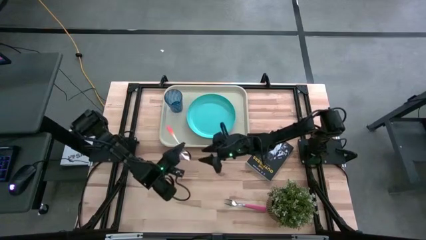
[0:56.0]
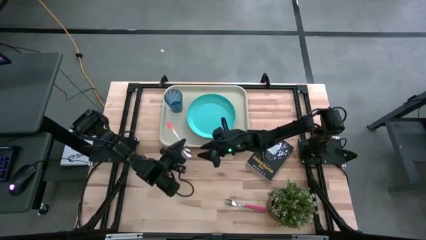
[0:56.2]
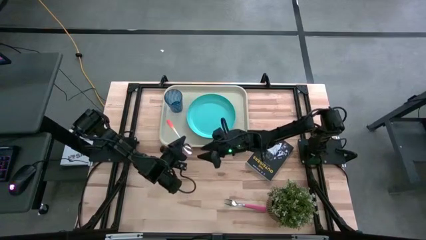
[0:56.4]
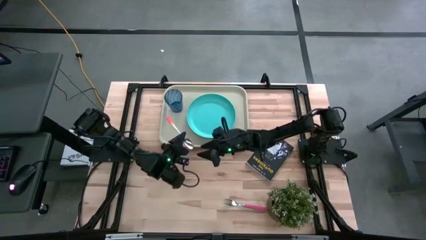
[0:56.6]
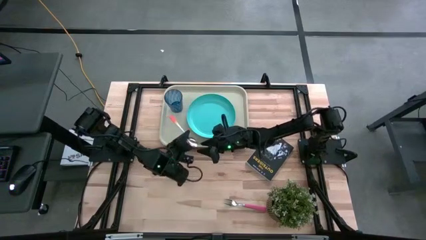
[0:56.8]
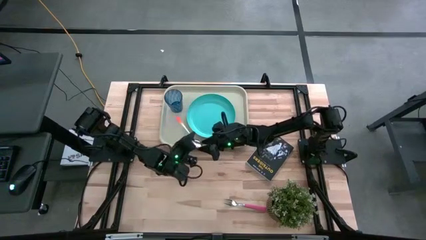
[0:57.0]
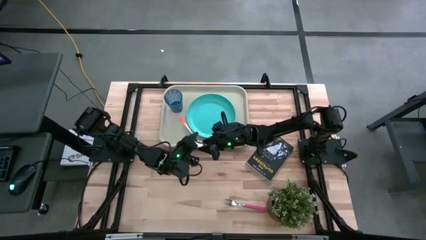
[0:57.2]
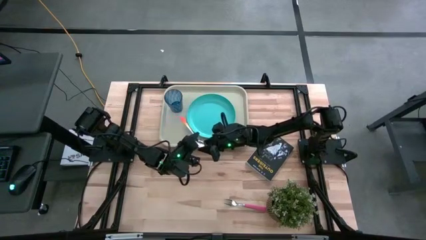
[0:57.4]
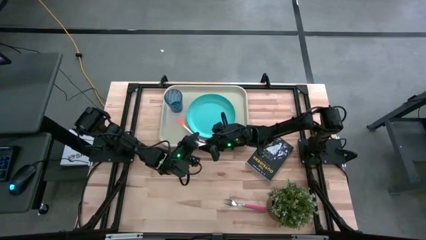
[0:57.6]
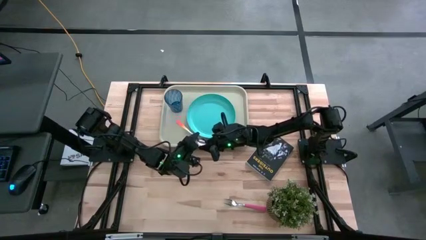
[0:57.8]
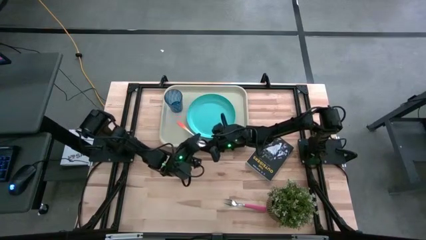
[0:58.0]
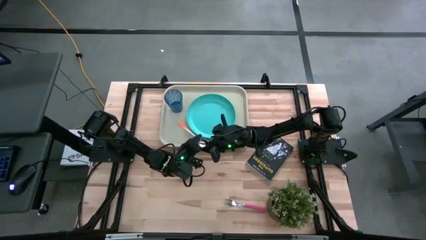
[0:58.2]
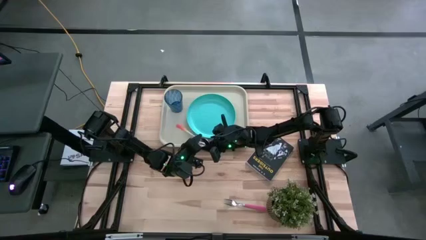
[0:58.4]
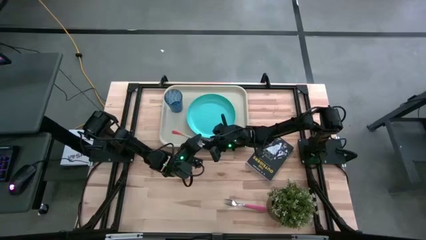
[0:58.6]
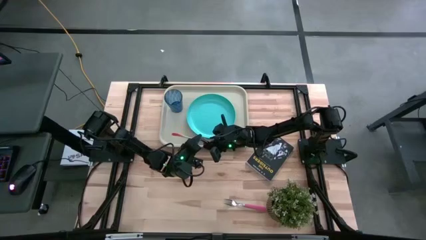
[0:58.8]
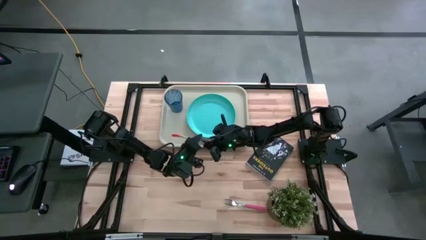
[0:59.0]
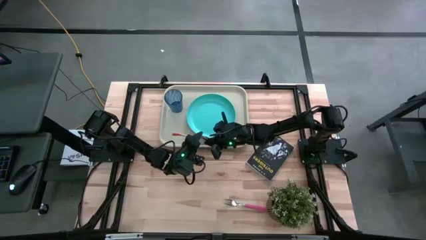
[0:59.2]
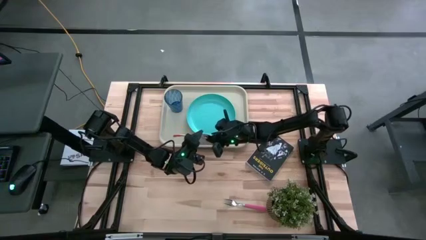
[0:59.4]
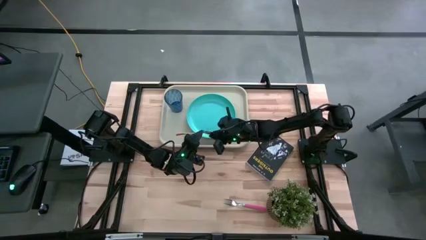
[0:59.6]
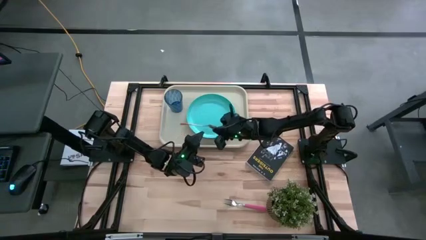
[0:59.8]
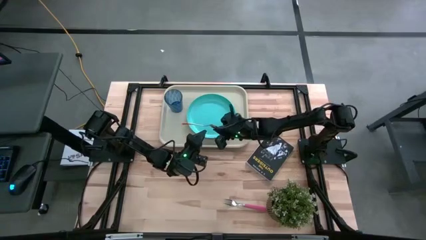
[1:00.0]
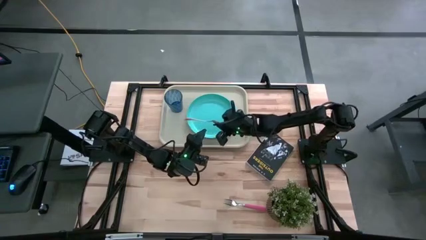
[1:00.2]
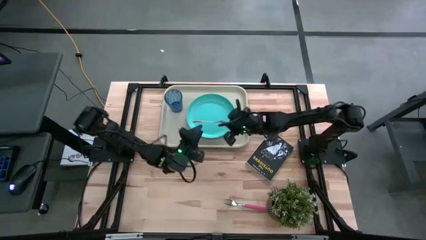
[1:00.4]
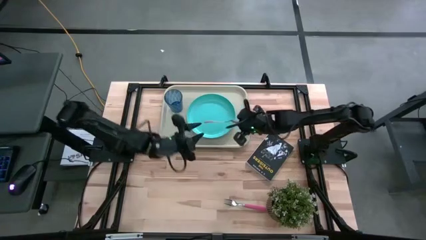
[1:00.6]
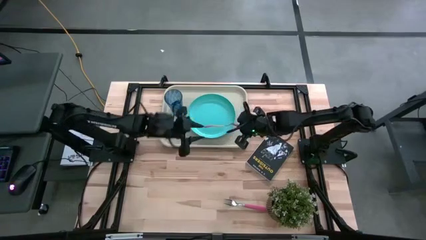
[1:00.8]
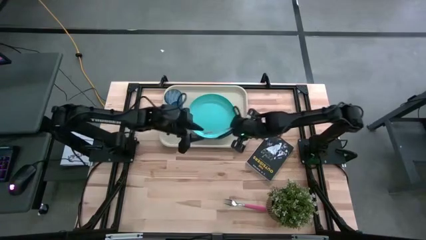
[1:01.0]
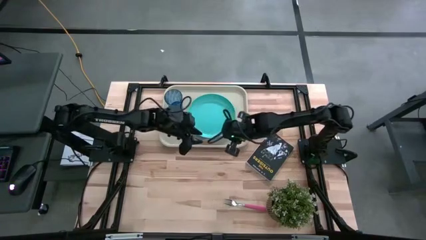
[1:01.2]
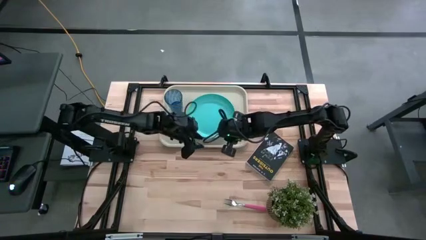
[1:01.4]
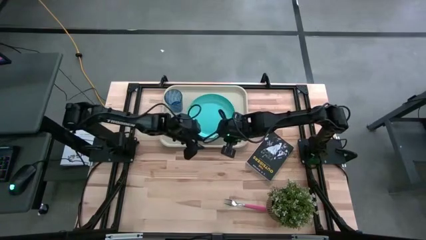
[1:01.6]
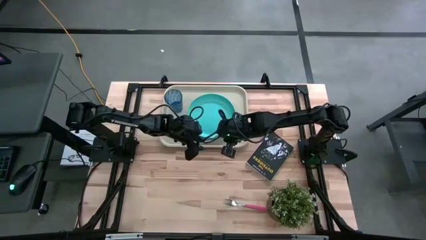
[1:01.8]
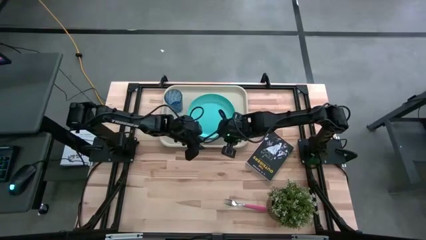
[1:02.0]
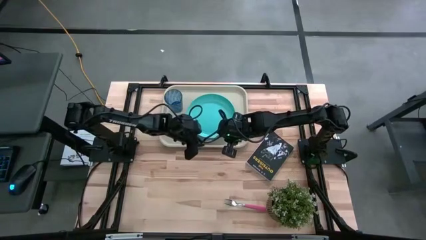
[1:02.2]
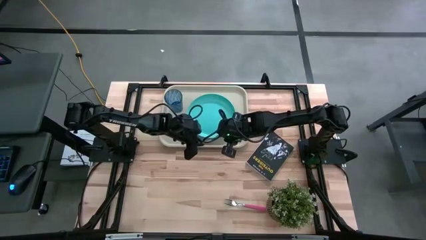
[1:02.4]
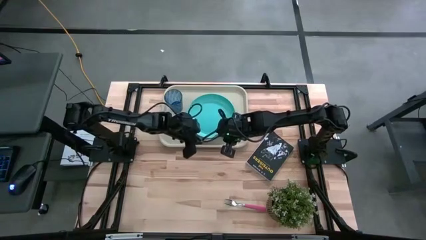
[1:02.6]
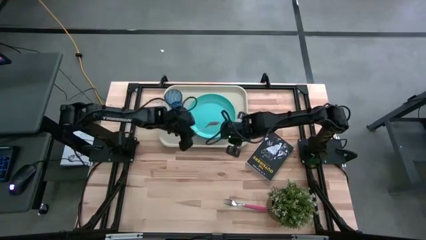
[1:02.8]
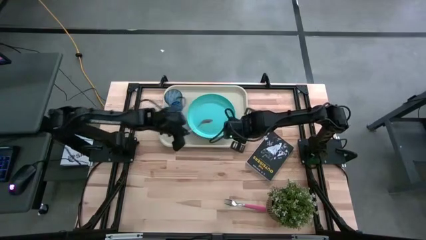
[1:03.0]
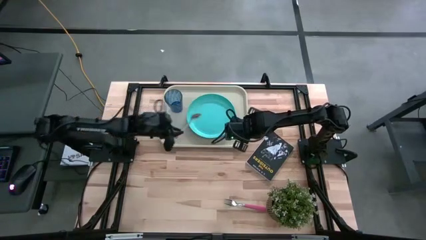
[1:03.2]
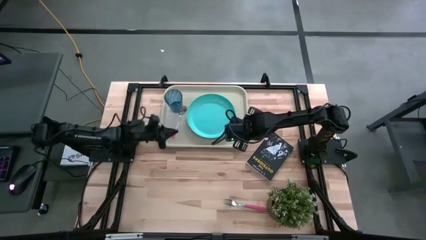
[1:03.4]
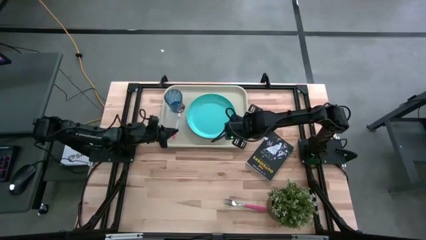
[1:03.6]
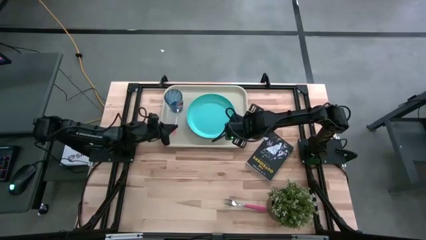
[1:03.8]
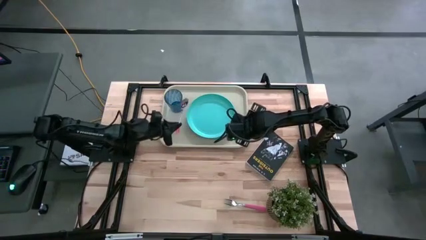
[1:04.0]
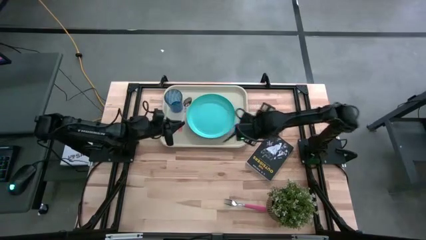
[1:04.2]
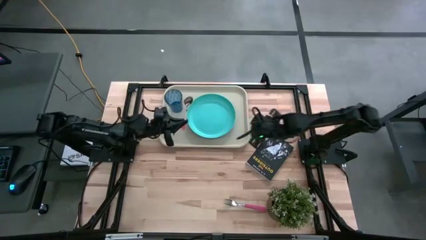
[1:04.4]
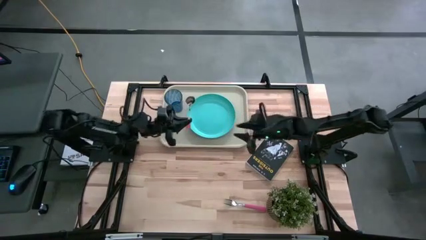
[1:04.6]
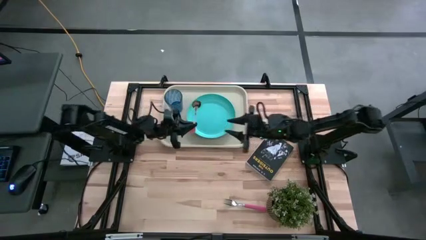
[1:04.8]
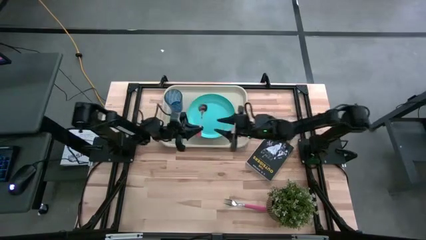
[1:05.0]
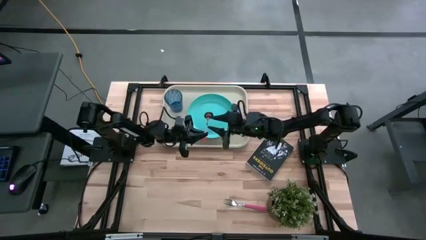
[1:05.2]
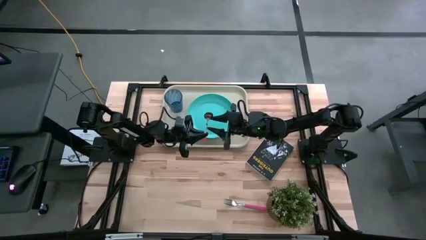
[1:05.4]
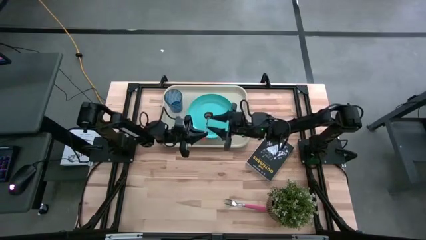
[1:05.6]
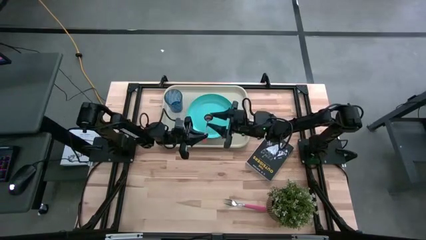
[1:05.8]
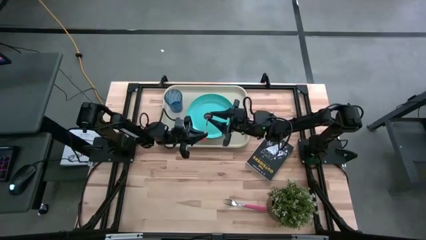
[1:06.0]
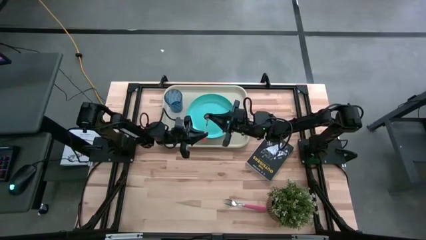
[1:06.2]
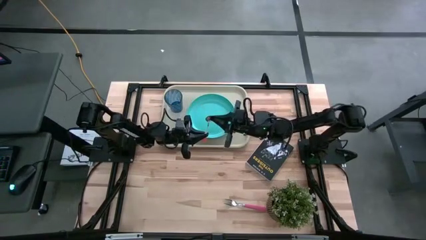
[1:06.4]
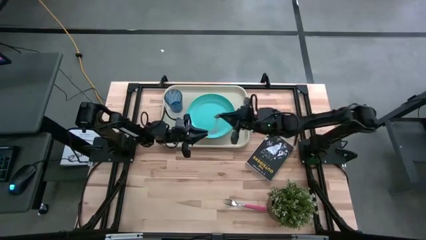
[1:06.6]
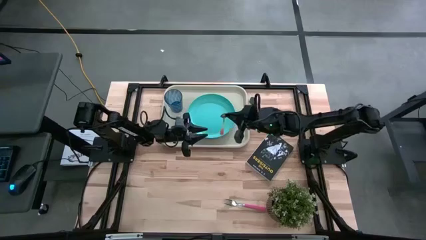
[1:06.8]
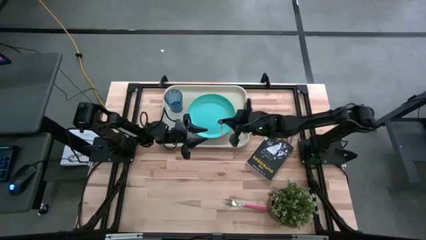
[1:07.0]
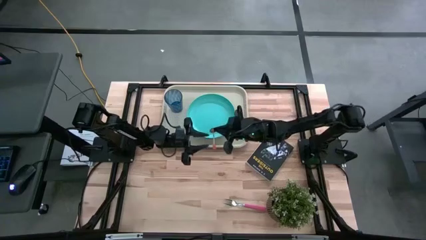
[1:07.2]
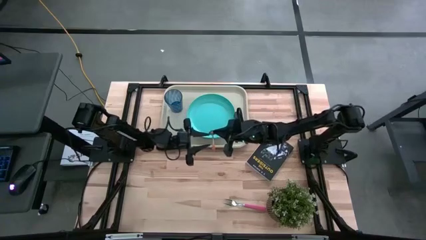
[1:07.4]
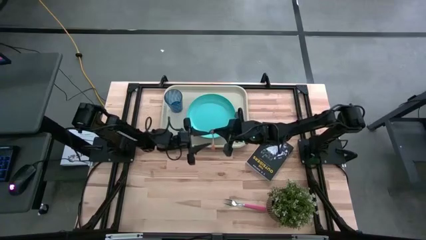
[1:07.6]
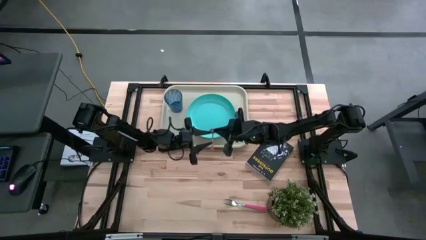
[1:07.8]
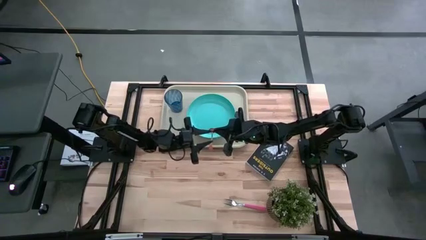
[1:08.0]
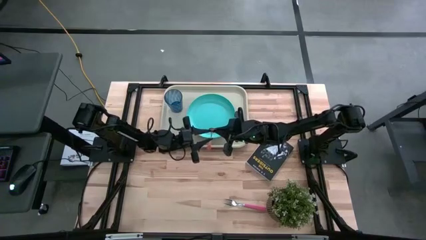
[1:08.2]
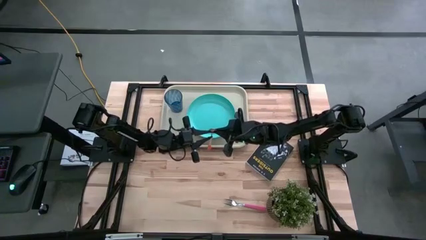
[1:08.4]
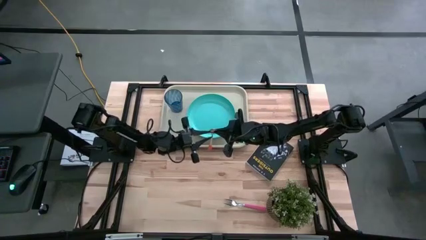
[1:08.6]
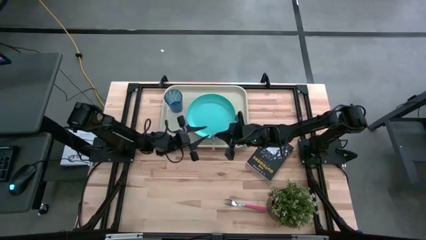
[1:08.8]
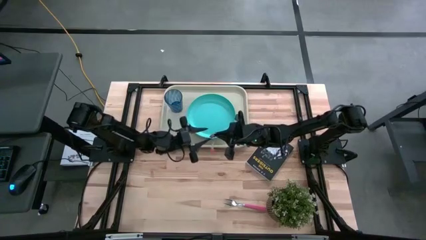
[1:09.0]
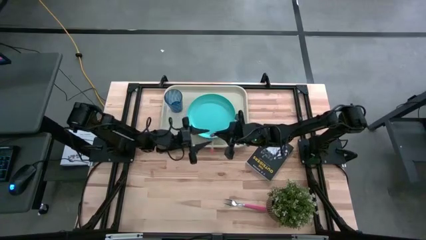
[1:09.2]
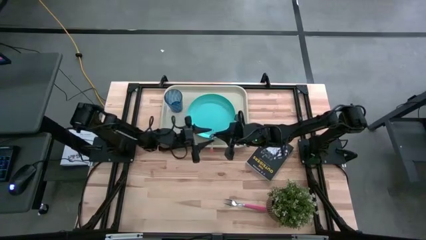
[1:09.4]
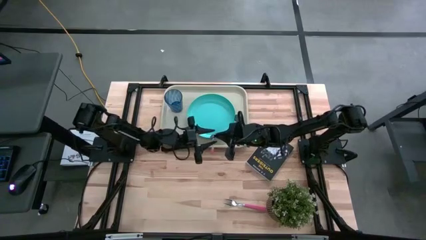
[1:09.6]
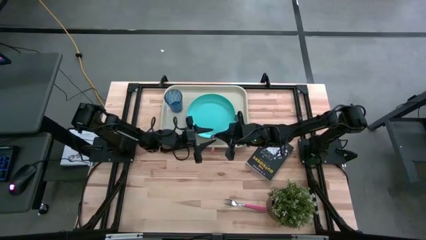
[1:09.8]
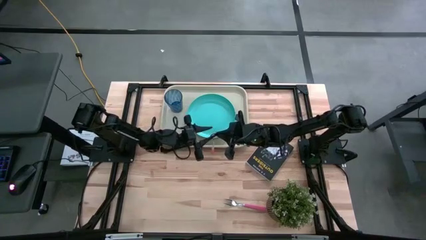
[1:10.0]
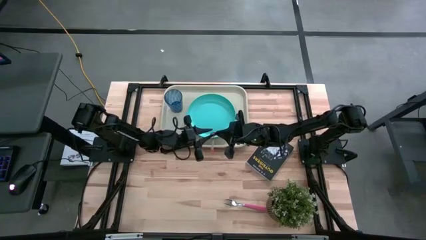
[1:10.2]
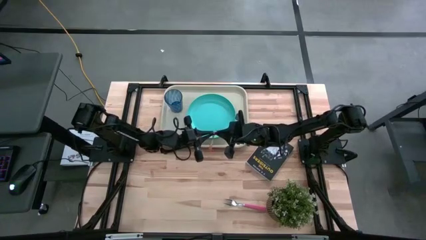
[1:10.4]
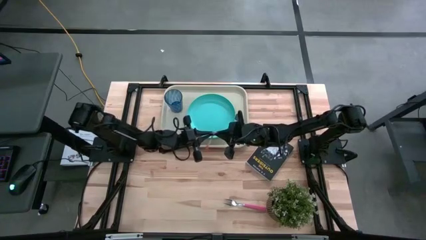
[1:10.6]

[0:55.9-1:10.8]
Task: Pick and place plate/cup/fork/spoon on tray
Put the orange spoon on the white tray beside the light blue plate
